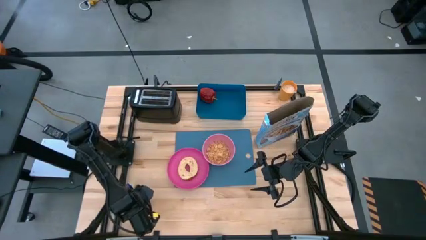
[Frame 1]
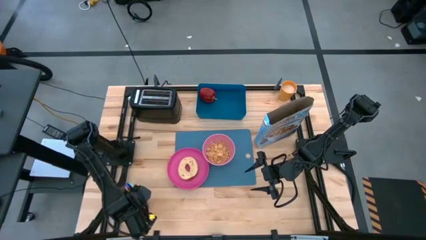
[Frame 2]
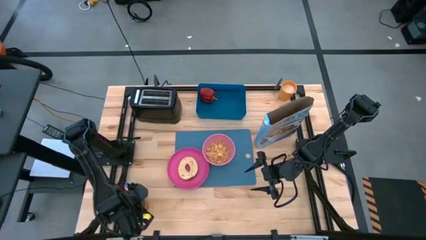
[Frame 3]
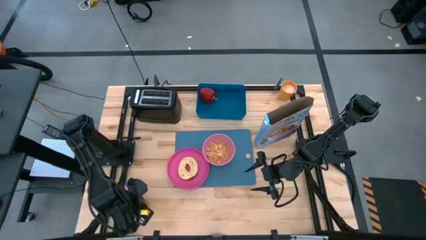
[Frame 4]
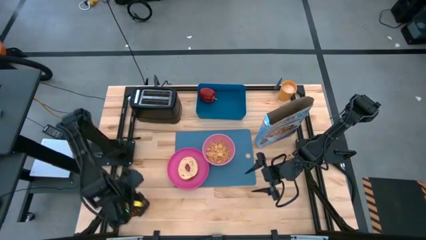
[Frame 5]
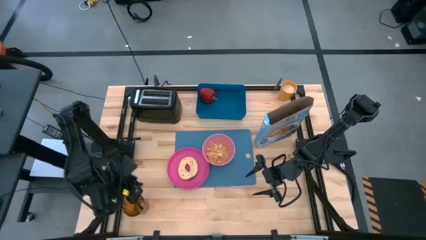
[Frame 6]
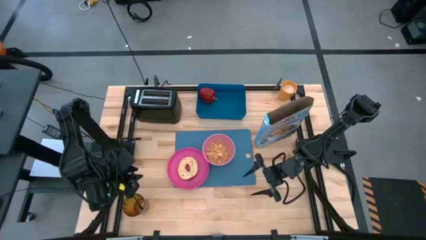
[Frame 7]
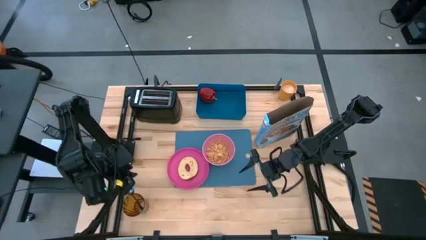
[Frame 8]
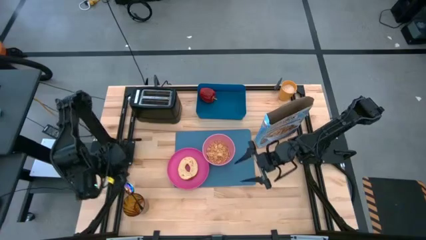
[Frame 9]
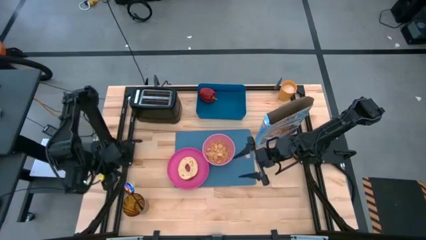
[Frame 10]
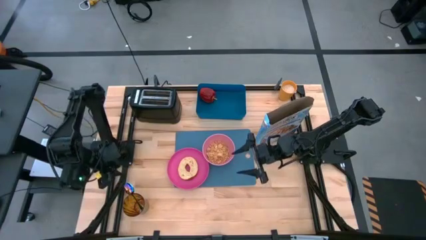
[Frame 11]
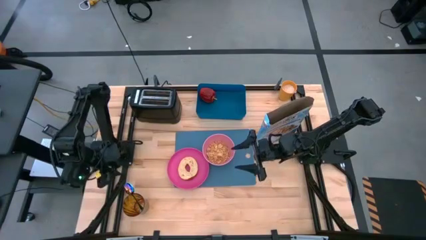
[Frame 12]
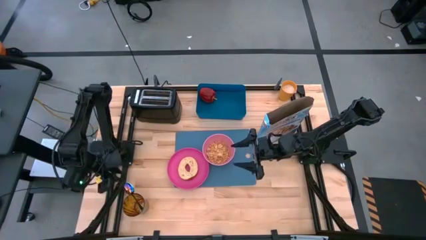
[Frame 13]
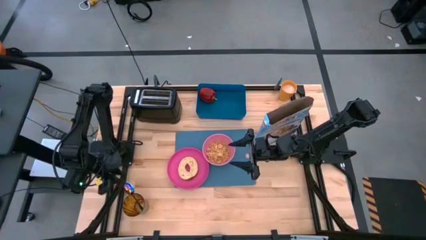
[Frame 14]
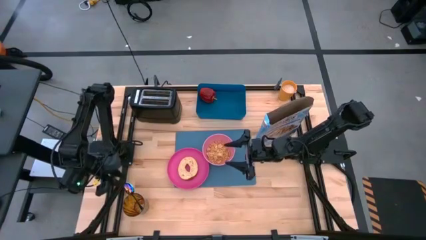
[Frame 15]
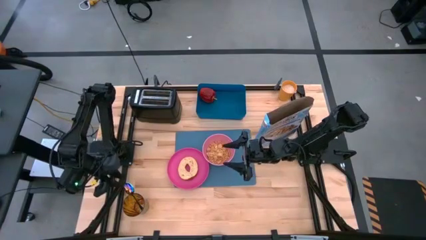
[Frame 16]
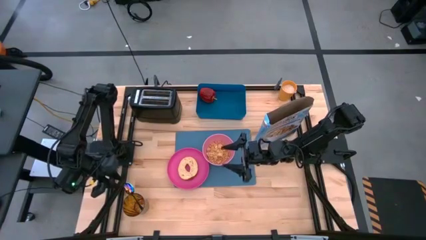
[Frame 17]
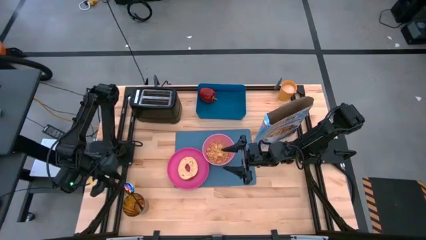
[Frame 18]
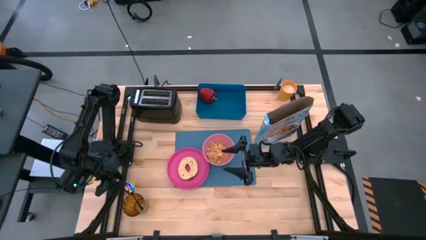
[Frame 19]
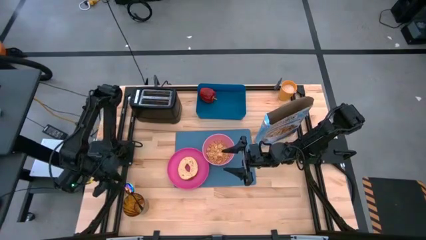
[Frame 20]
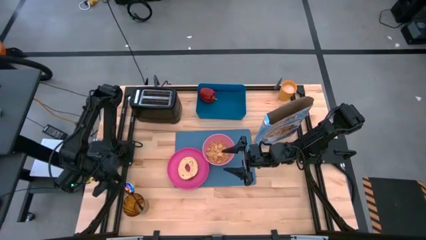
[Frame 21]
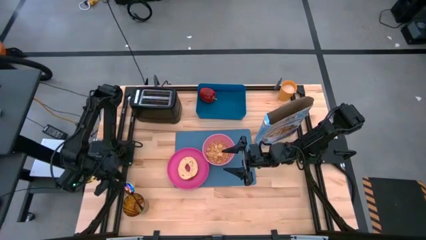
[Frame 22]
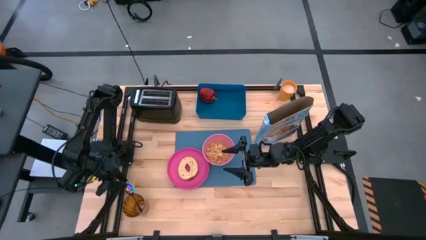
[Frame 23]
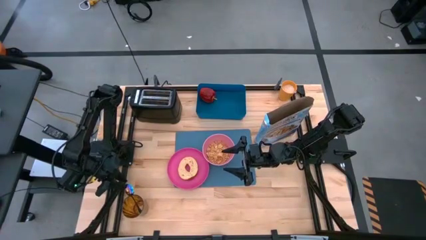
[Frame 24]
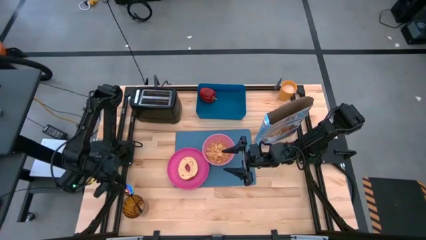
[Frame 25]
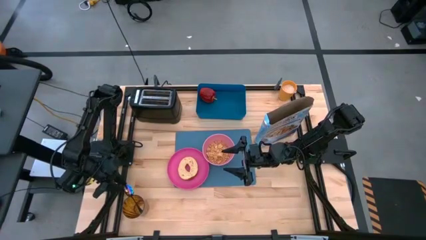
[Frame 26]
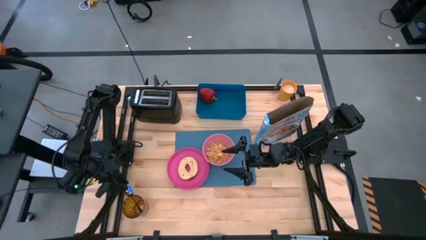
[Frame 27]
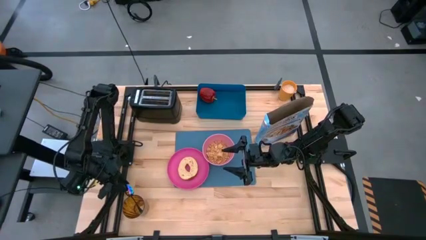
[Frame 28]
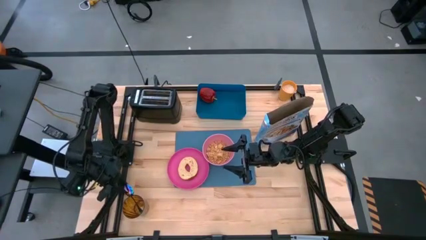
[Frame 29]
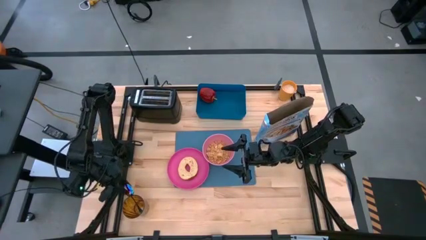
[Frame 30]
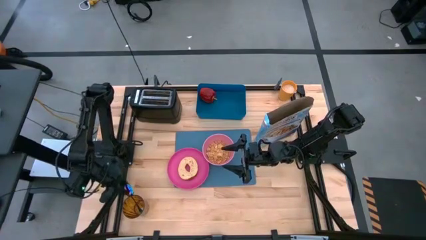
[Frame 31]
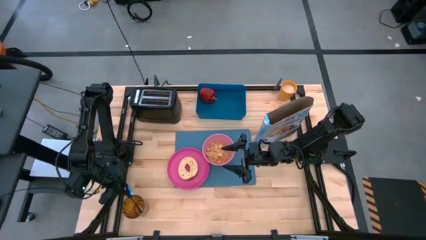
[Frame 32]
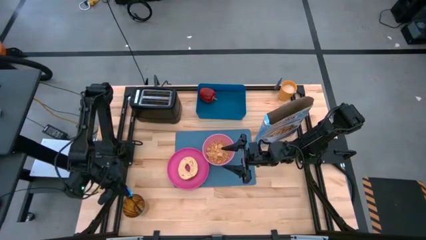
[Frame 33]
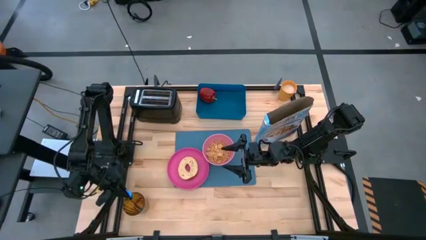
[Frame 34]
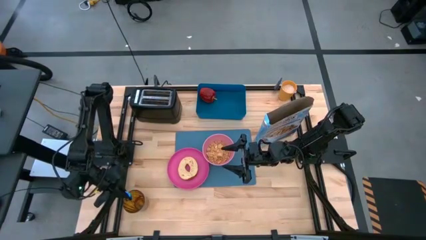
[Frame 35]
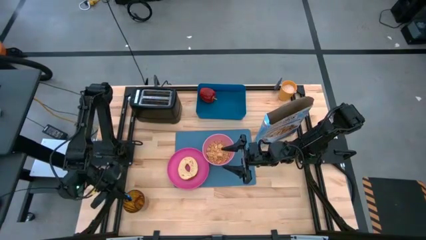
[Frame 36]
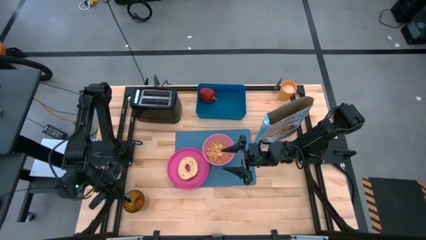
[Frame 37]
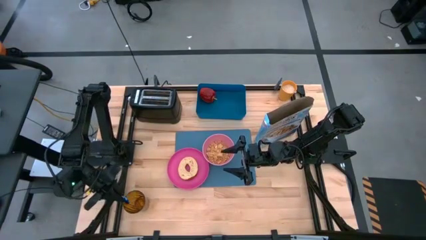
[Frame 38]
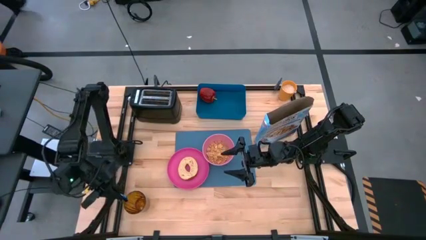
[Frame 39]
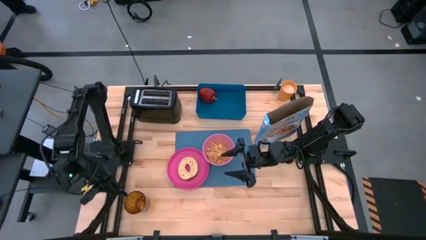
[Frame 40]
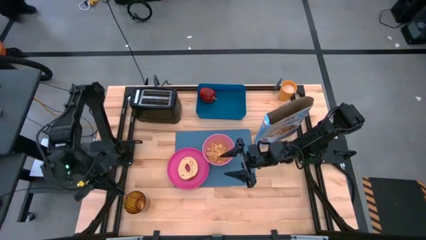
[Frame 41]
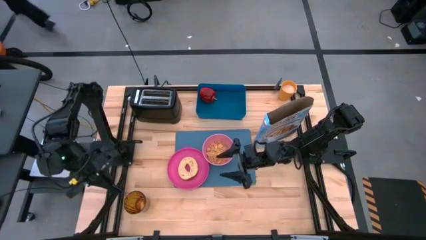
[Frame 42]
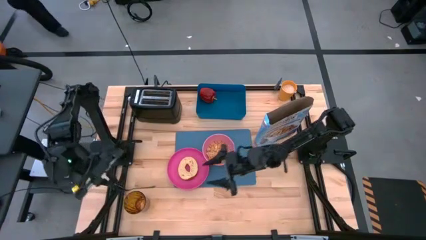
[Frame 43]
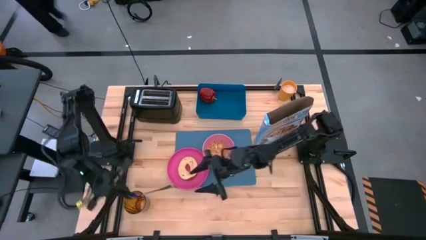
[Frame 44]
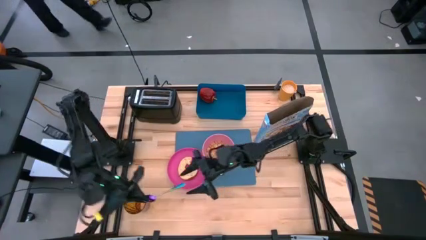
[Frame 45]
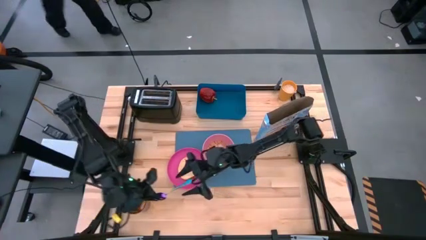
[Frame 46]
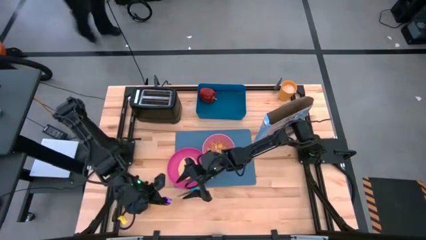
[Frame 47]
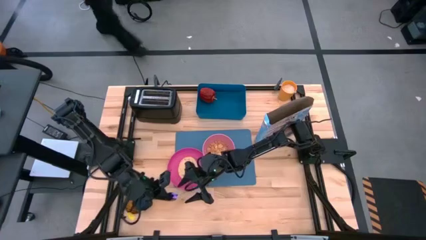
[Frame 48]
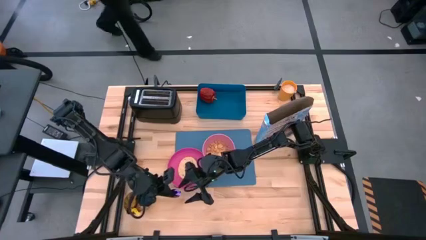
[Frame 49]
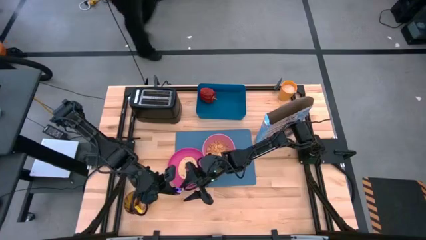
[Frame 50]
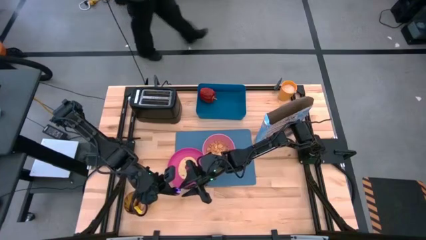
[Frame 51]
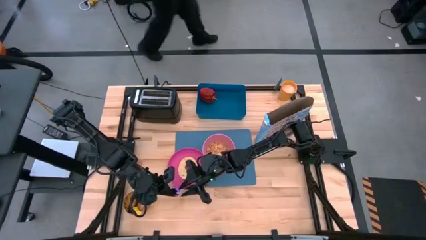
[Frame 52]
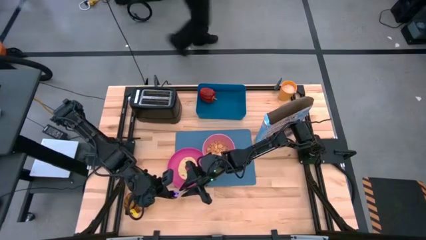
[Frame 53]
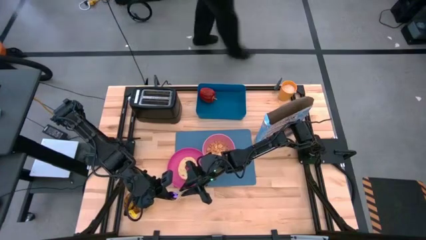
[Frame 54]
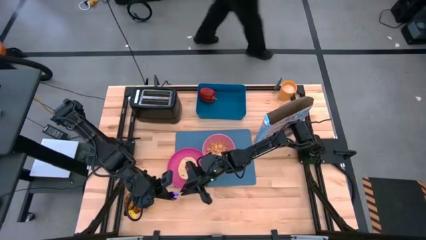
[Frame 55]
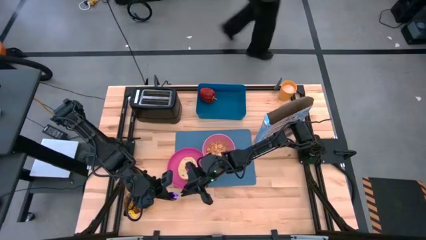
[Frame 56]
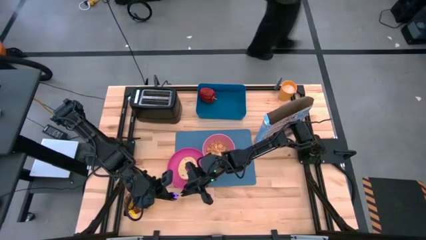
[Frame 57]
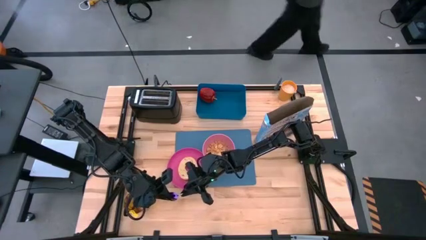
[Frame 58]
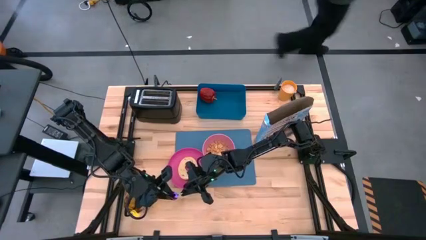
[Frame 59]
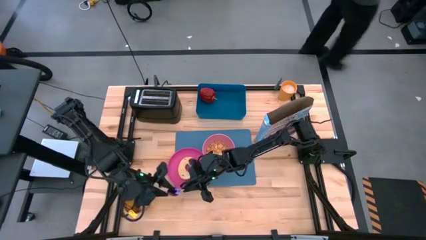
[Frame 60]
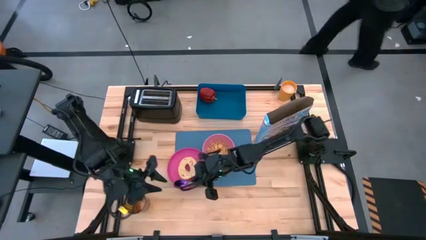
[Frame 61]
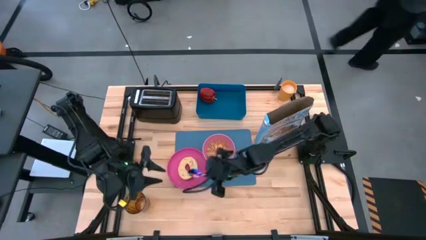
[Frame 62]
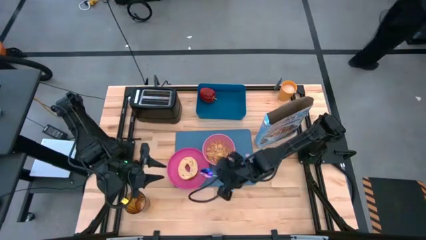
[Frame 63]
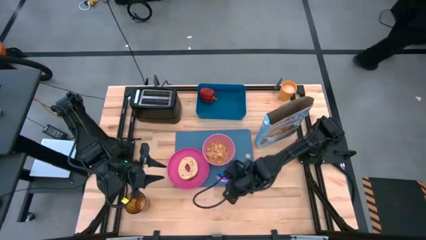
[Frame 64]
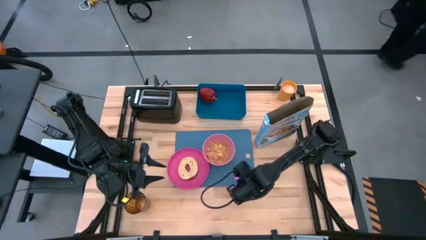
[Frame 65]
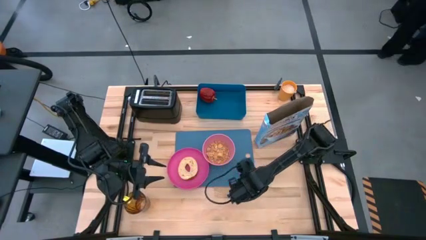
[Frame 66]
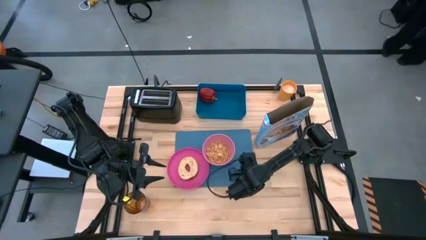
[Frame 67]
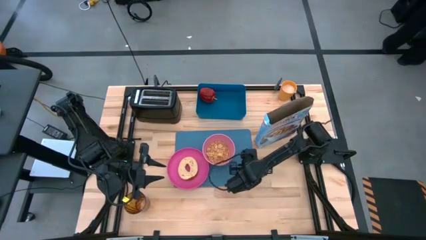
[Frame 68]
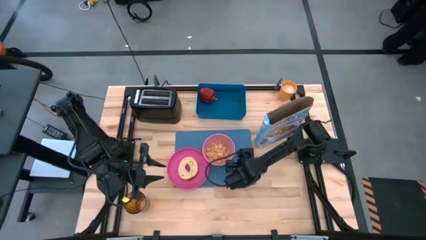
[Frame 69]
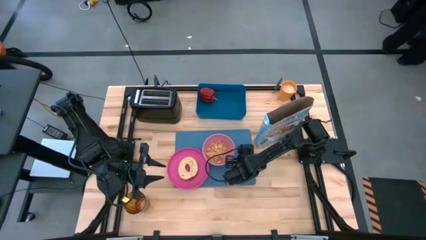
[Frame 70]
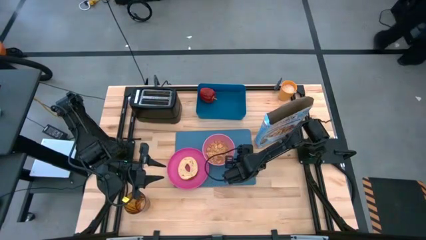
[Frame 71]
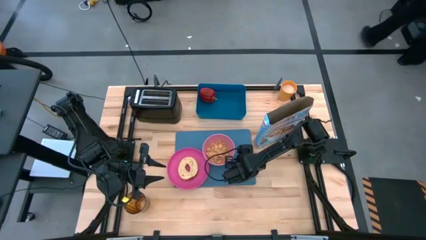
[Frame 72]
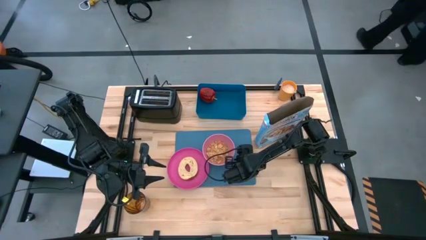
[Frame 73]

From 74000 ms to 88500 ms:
Task: Arrange a breakfast setting
Put the iridescent spoon on the blue placemat

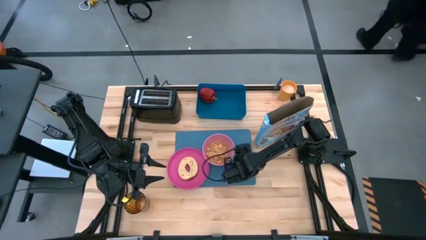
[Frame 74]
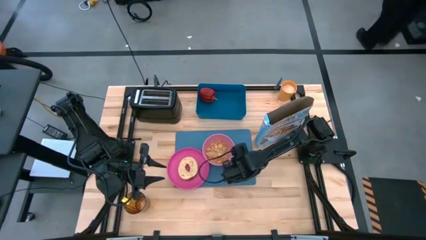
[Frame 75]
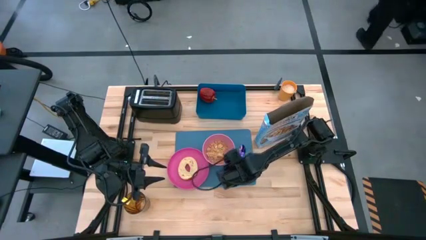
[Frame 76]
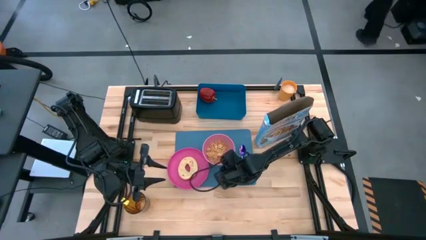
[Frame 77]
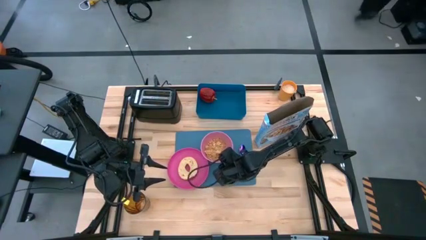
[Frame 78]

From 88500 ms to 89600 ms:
Adjust the pink bowl
